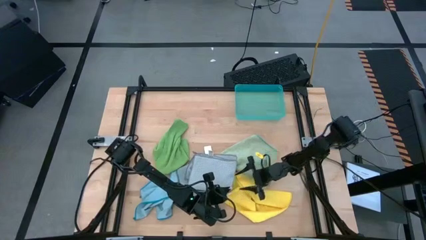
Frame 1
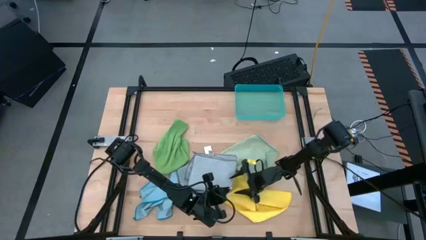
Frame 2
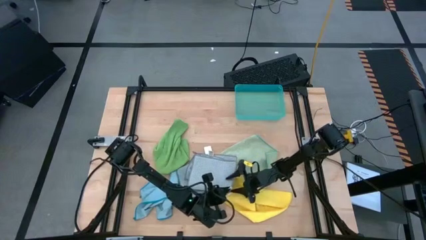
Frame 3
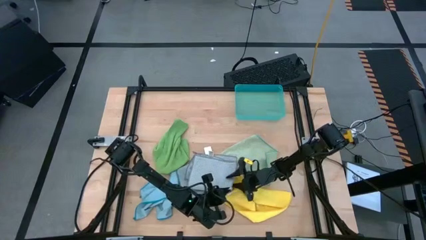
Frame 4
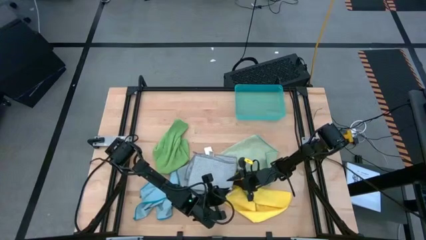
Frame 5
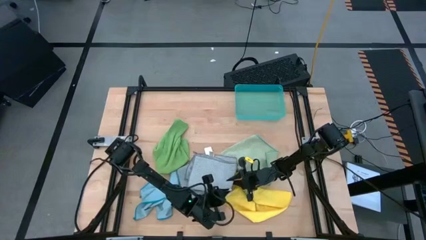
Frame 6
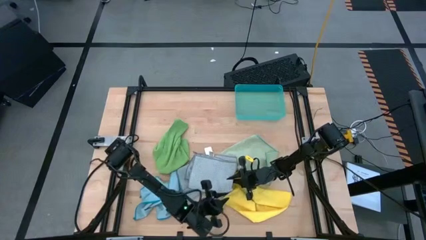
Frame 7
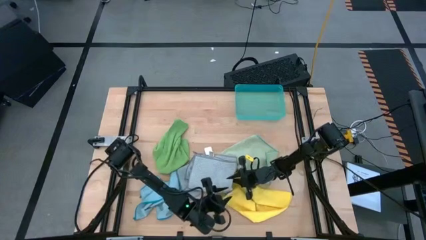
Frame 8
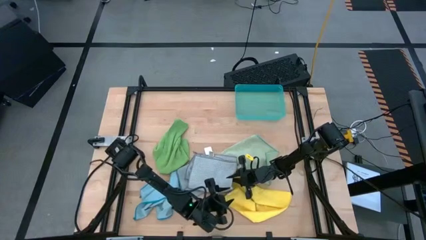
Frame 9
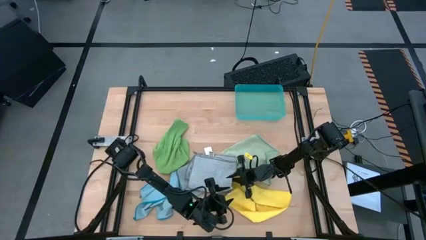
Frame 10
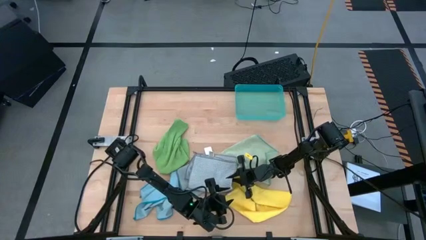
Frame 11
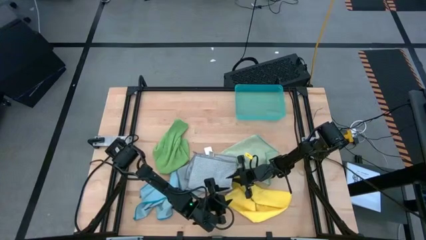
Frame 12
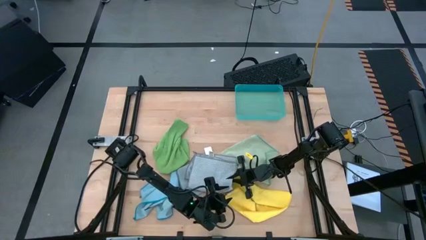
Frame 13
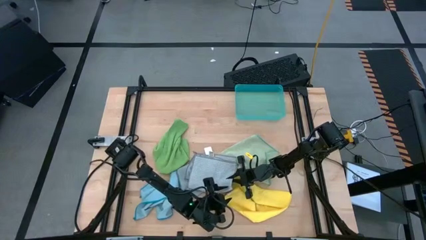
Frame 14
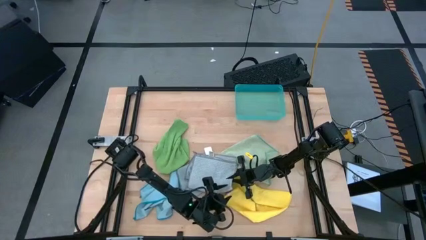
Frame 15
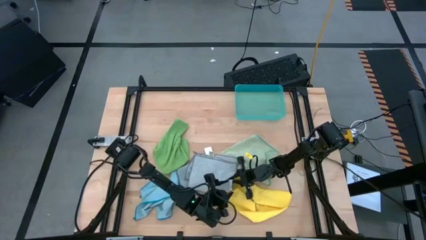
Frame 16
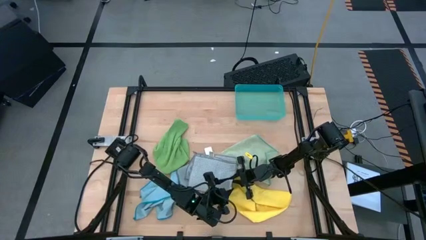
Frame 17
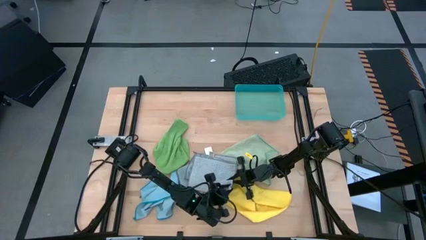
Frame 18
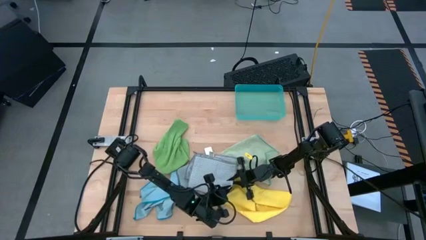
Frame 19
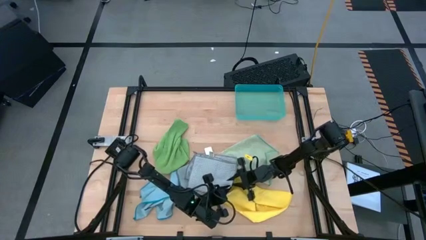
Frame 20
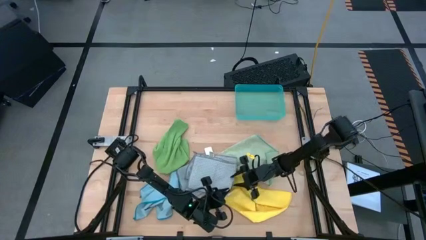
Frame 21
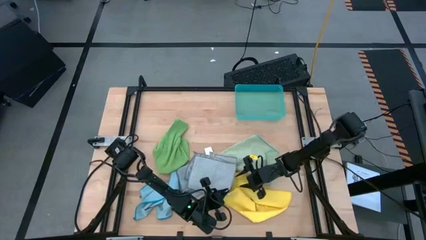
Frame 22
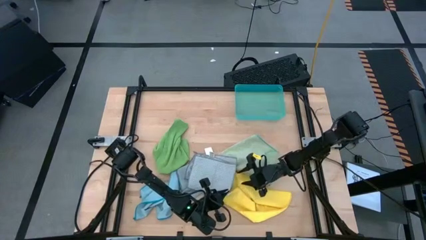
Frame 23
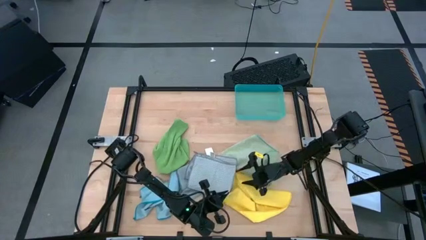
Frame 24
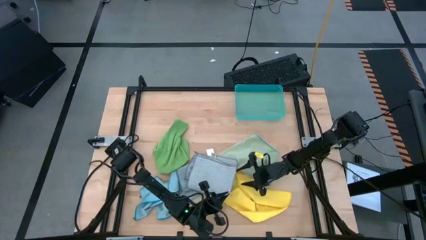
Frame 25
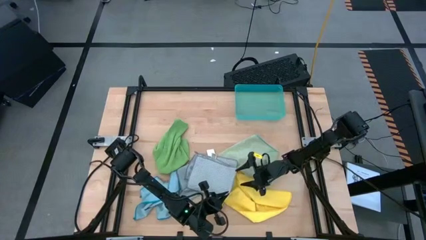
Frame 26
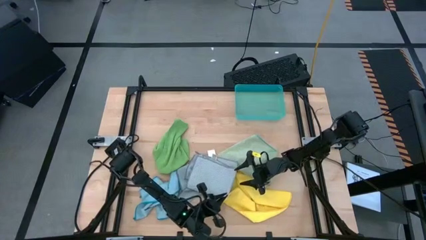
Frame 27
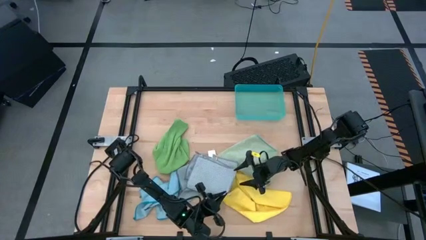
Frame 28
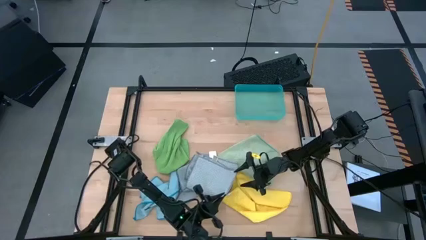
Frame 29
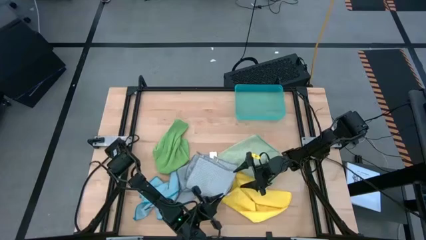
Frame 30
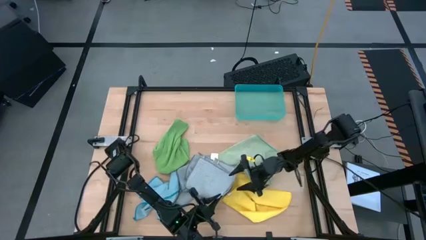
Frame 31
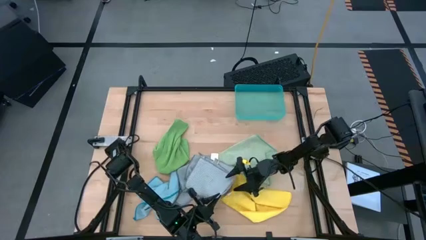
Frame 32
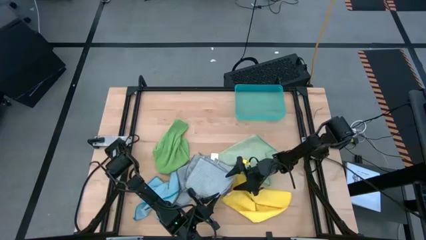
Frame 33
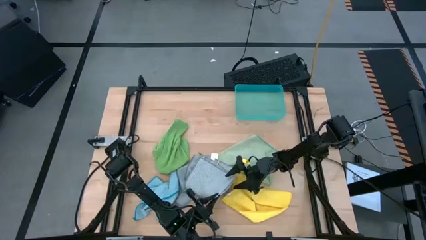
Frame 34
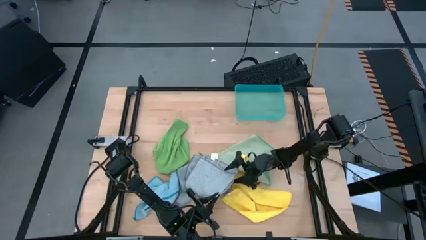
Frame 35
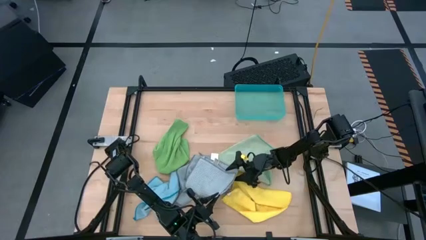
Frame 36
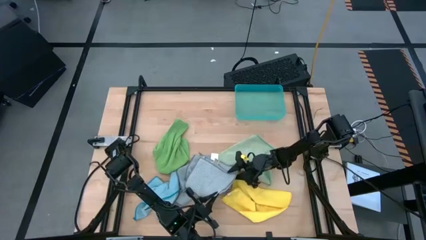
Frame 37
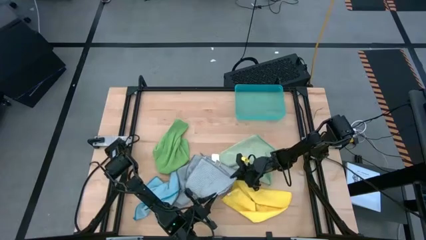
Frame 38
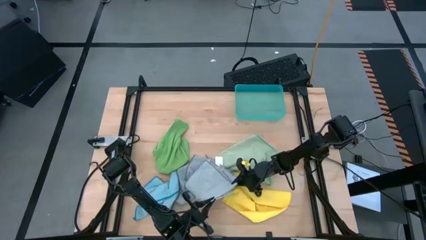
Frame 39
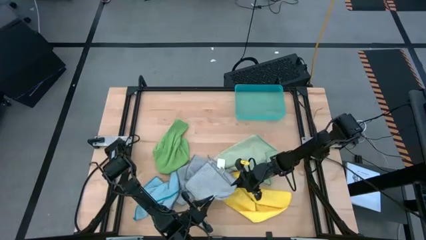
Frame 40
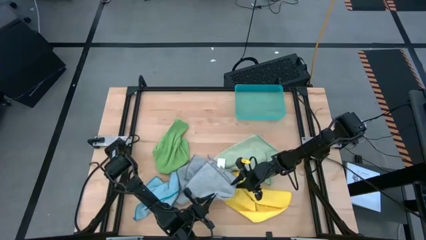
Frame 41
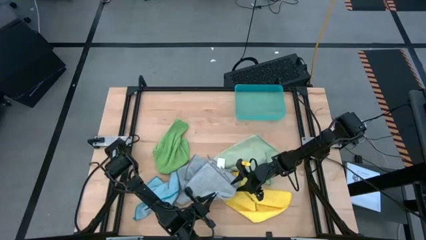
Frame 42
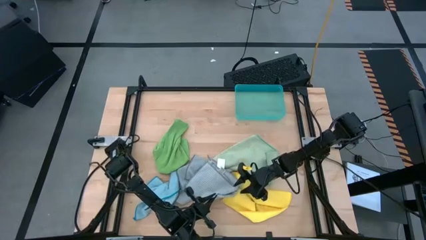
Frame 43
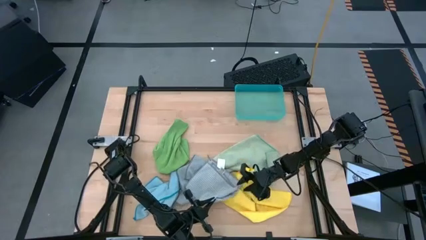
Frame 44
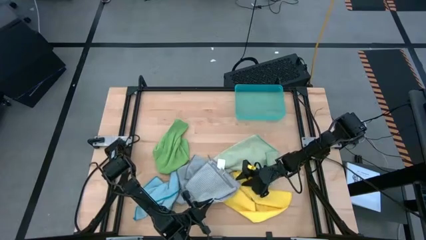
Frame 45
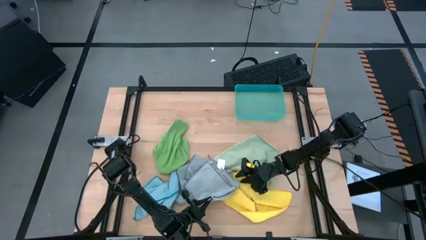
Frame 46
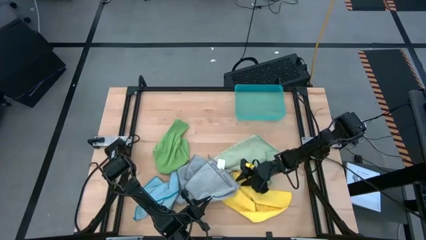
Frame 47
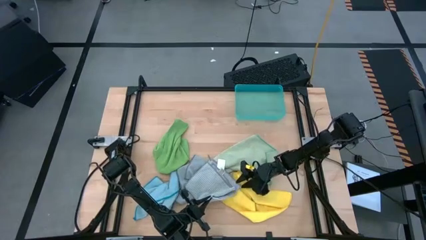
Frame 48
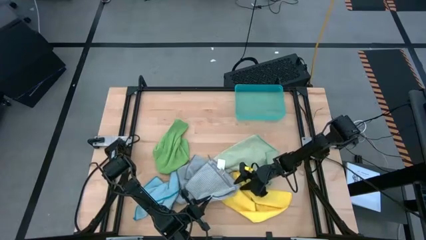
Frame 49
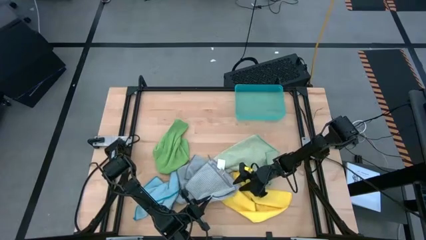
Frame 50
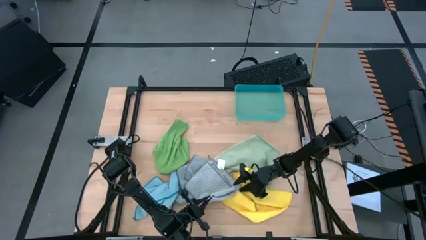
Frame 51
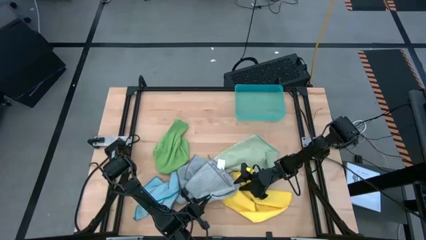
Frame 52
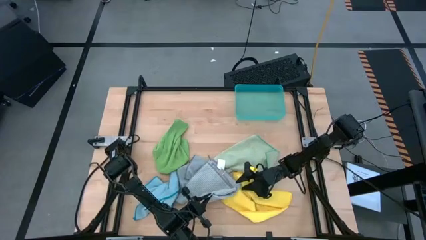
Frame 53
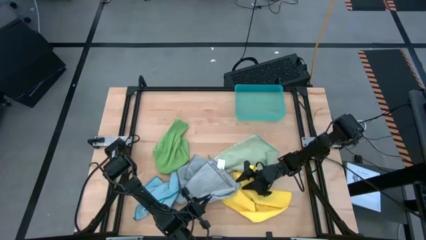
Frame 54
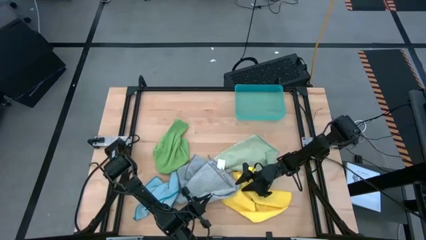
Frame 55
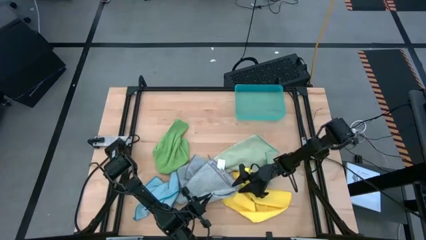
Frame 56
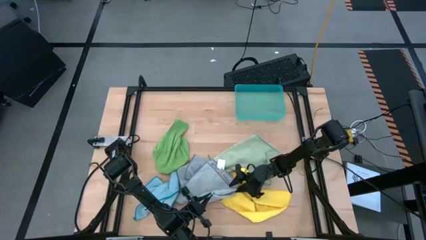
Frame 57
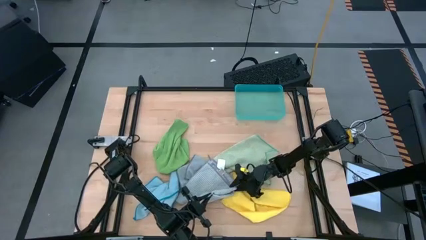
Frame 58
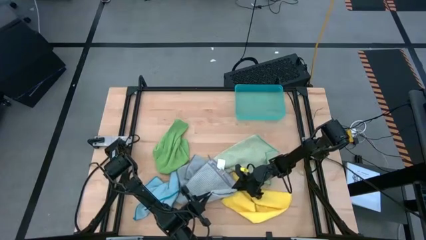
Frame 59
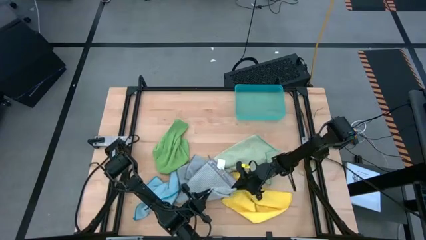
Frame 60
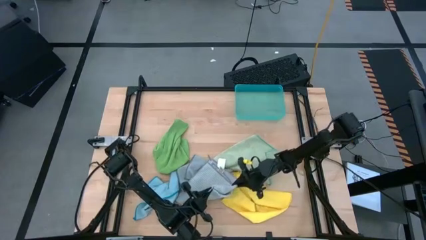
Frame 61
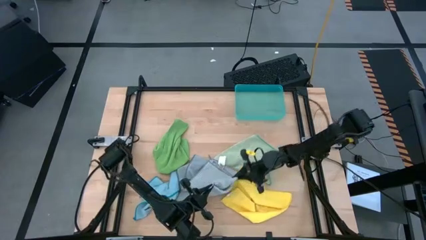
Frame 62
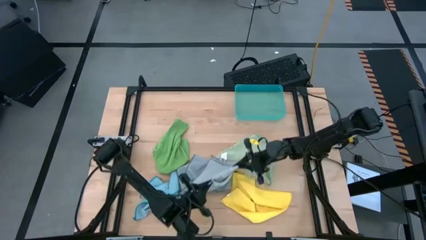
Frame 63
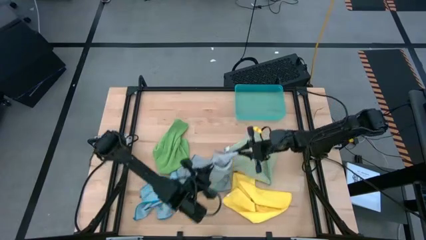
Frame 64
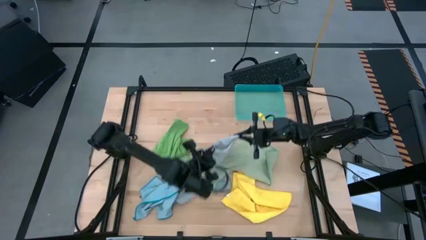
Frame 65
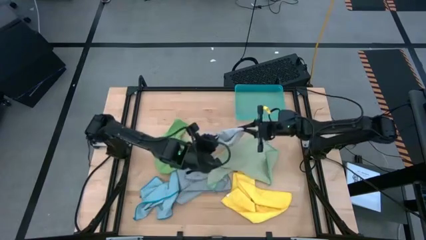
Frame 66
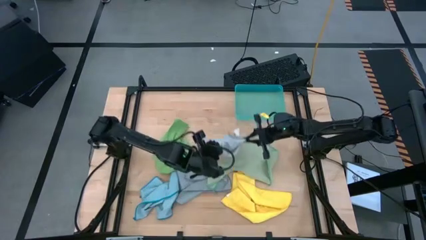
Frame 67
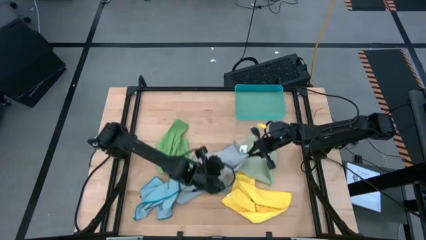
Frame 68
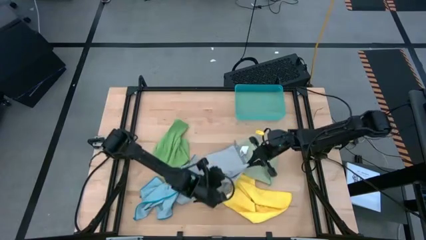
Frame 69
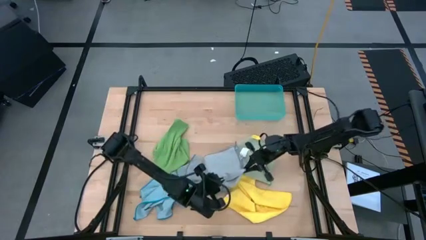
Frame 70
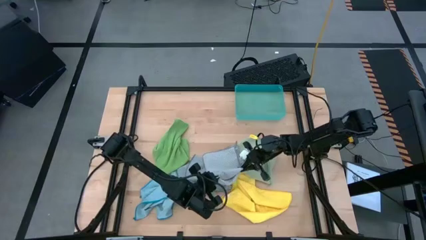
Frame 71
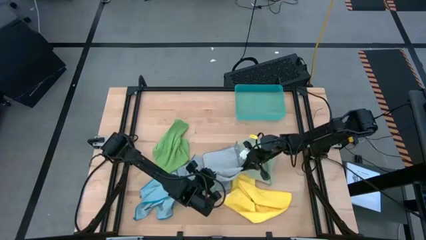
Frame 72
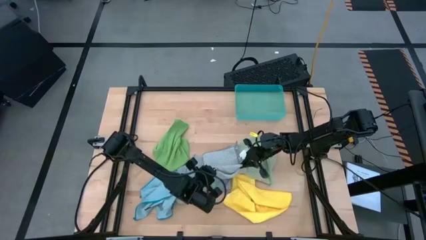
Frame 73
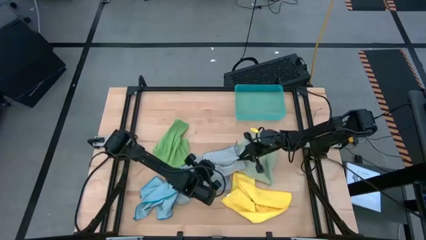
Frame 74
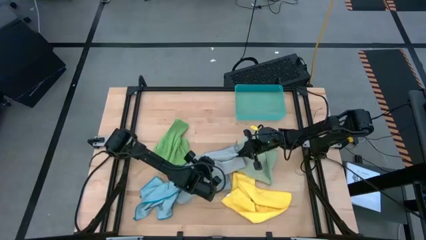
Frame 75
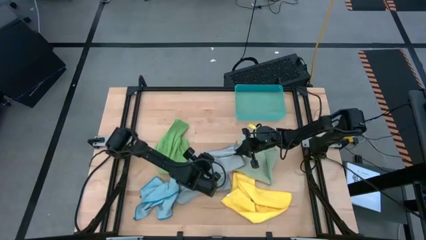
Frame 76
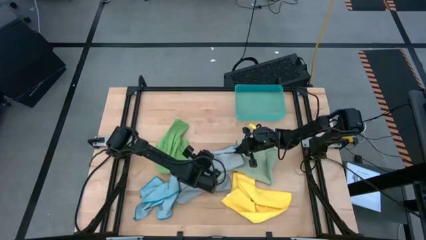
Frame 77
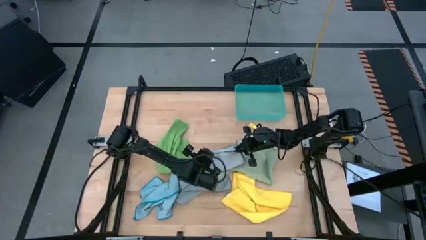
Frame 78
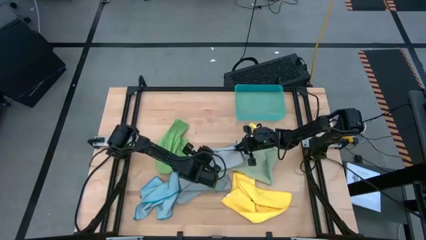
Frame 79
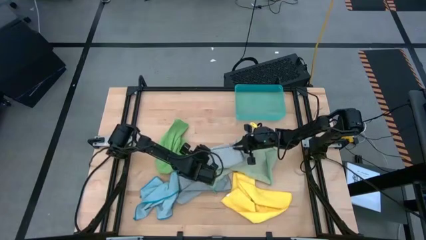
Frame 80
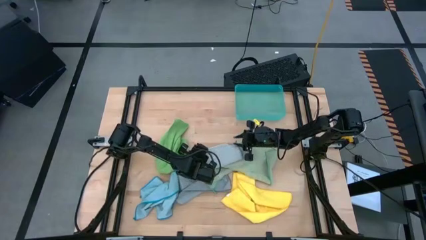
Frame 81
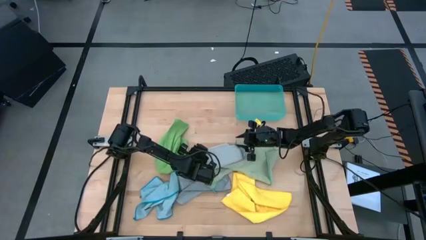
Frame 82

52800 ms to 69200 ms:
Task: Fold microfiber towels
Fold the right gray microfiber cloth
